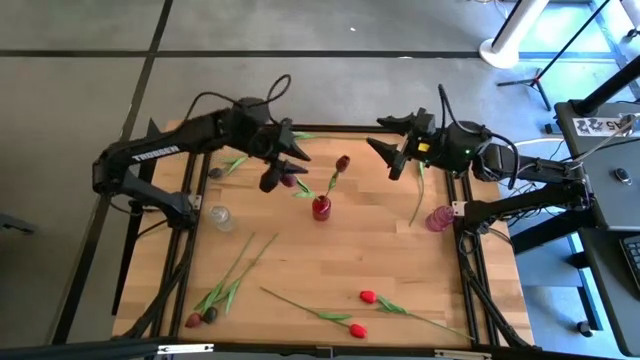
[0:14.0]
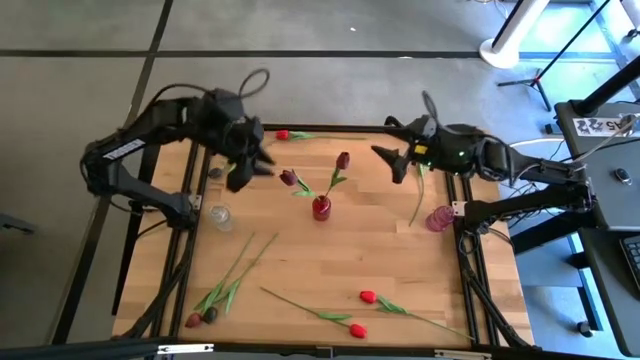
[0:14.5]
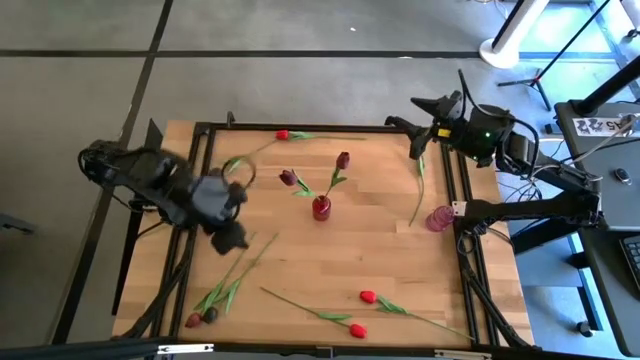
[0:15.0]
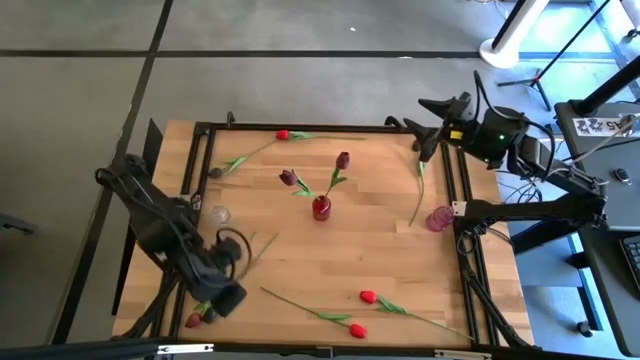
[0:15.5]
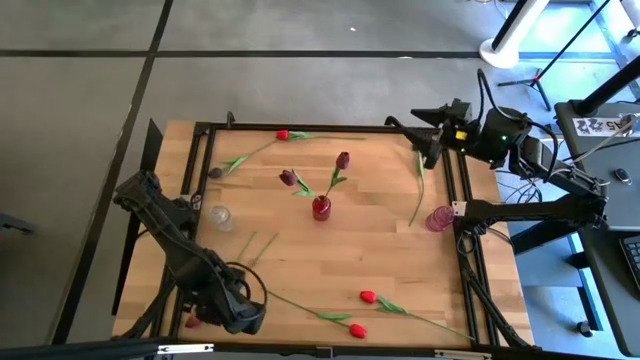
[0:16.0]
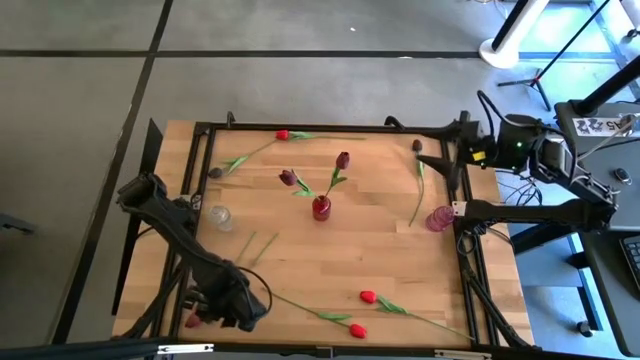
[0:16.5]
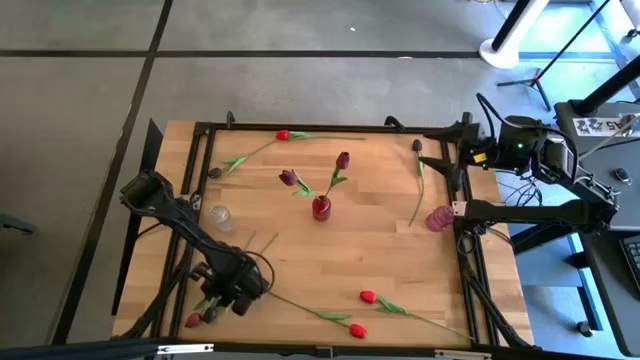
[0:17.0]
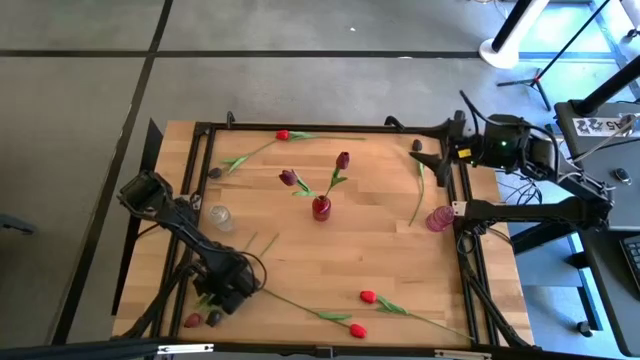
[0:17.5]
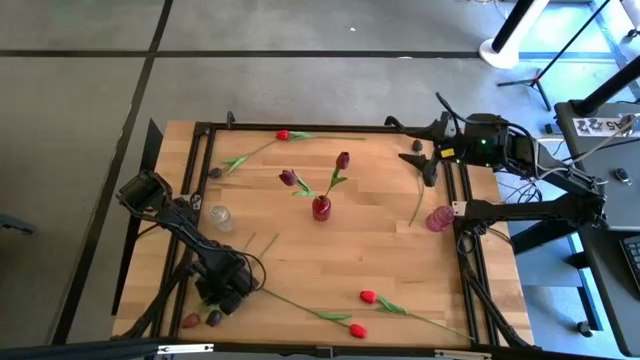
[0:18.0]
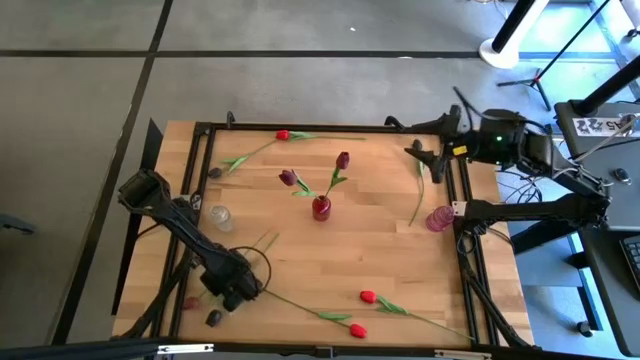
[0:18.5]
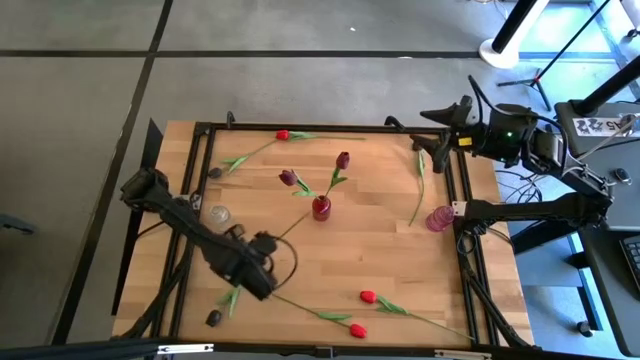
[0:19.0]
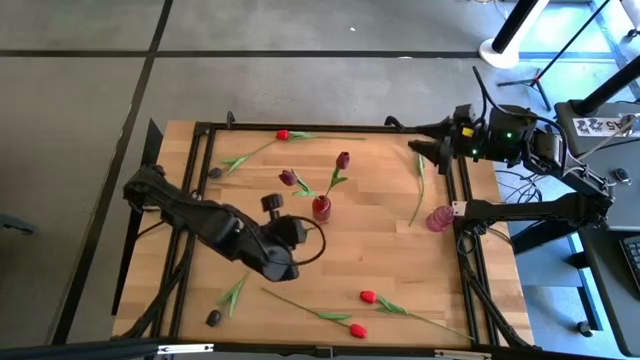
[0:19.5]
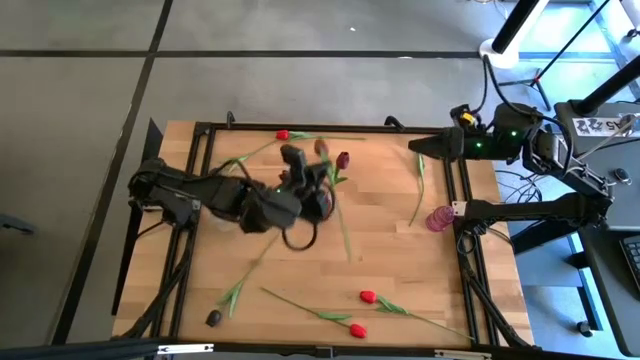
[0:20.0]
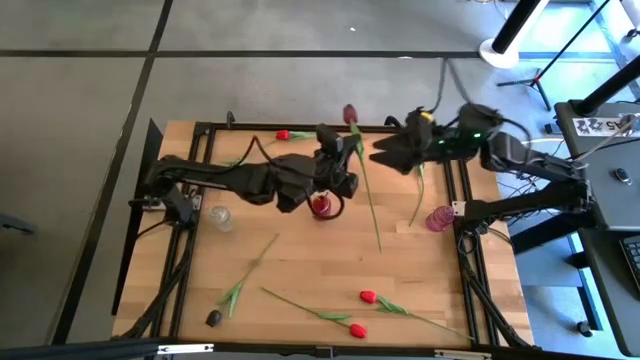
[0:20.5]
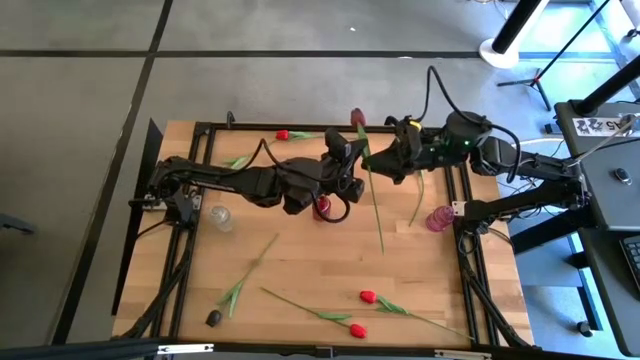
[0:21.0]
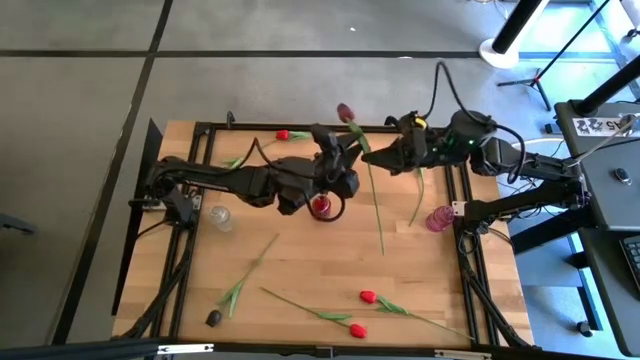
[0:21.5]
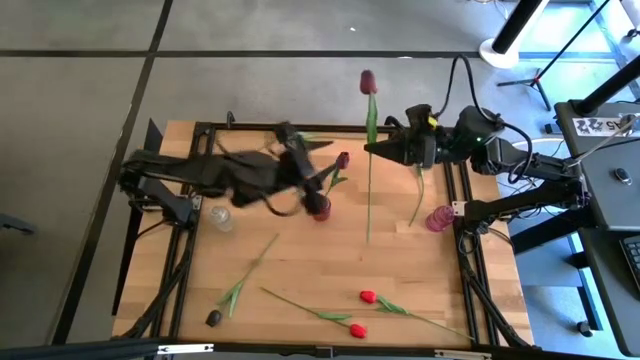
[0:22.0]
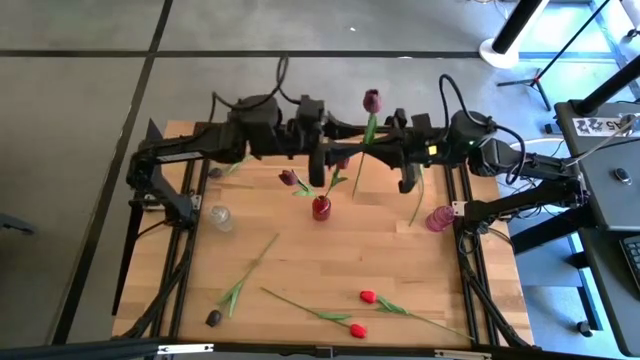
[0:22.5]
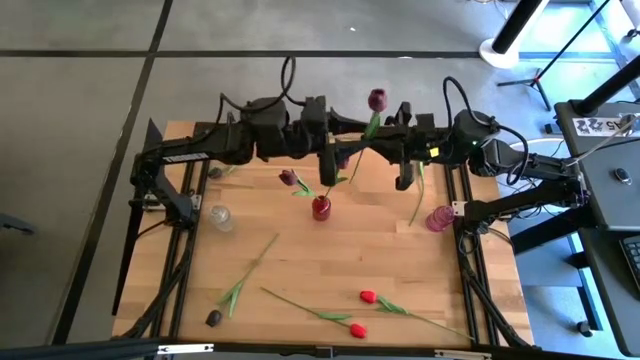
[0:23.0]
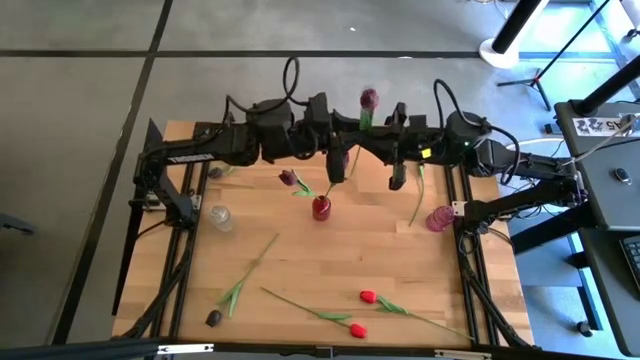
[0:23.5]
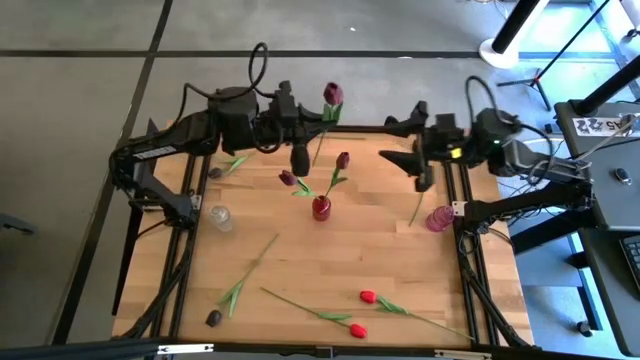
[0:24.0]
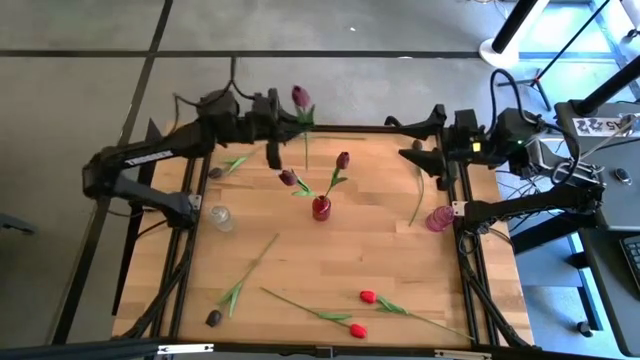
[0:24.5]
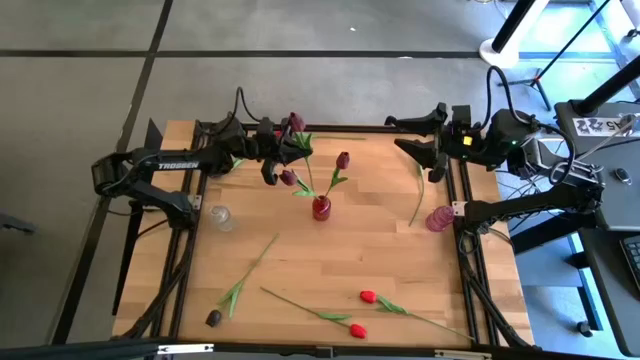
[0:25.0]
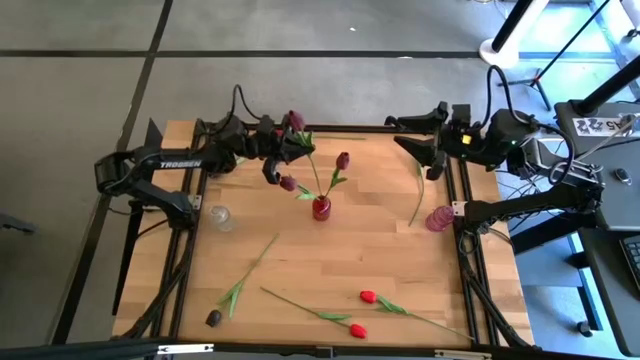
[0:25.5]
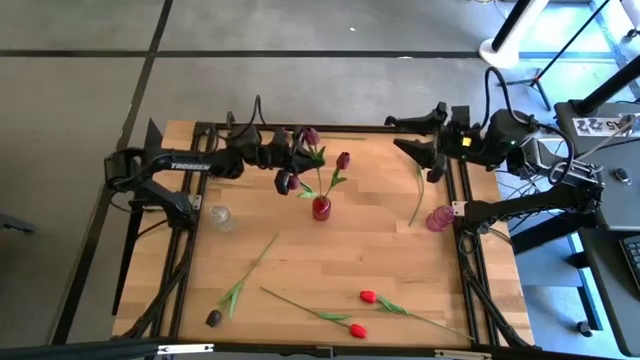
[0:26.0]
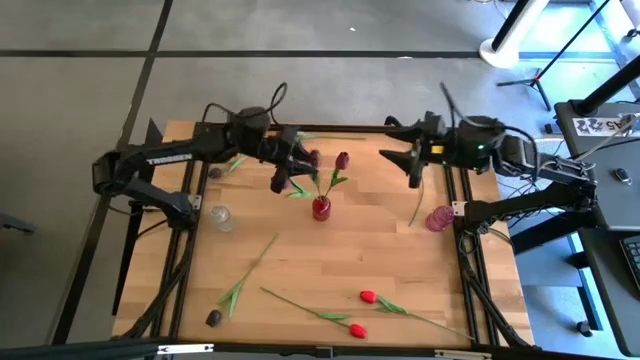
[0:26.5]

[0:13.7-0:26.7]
Task: Sort flowers into vase by color
Put the dark red tulip into the red vase

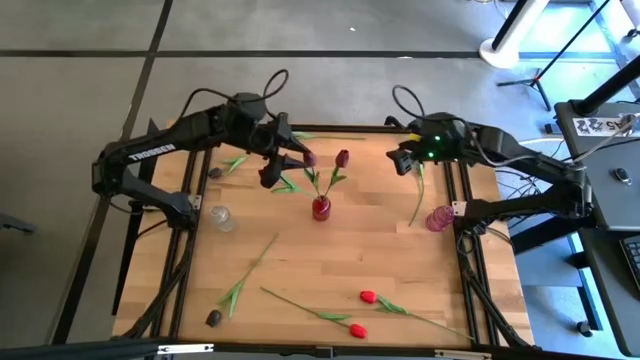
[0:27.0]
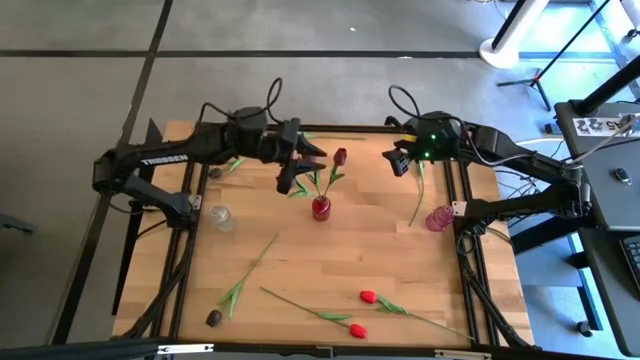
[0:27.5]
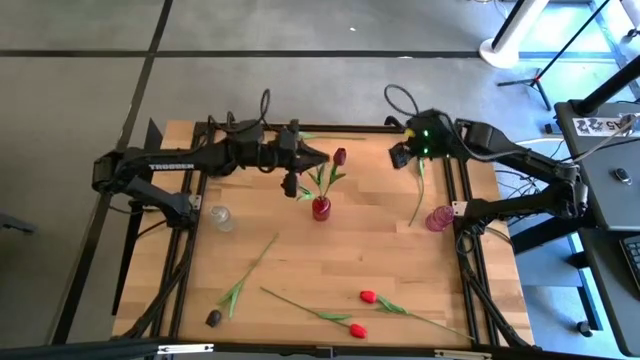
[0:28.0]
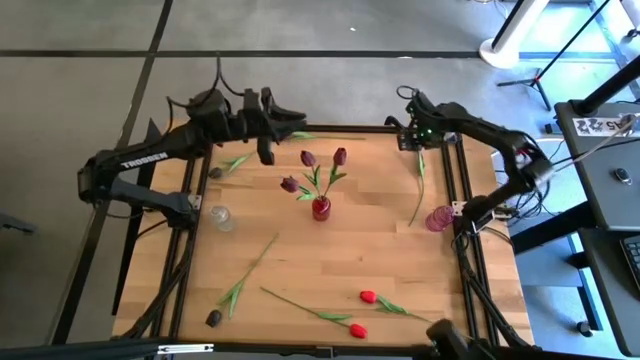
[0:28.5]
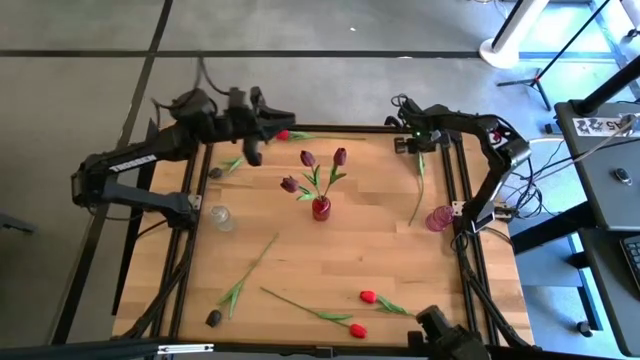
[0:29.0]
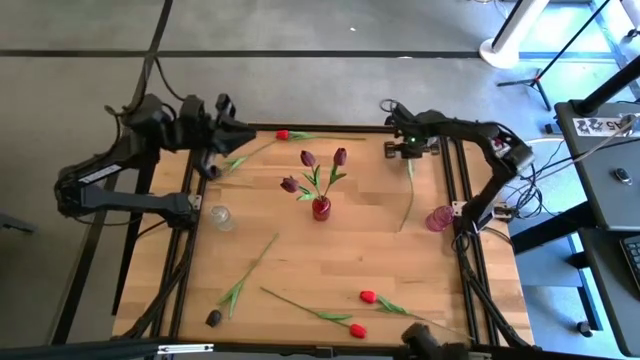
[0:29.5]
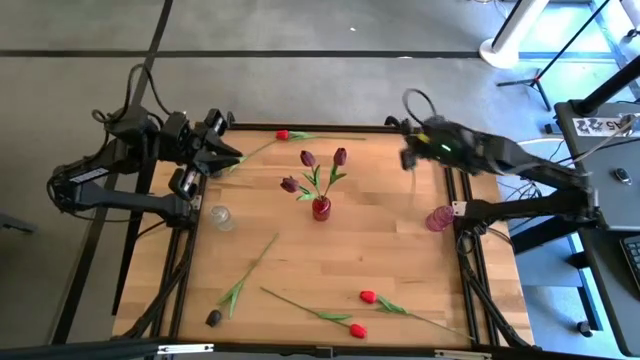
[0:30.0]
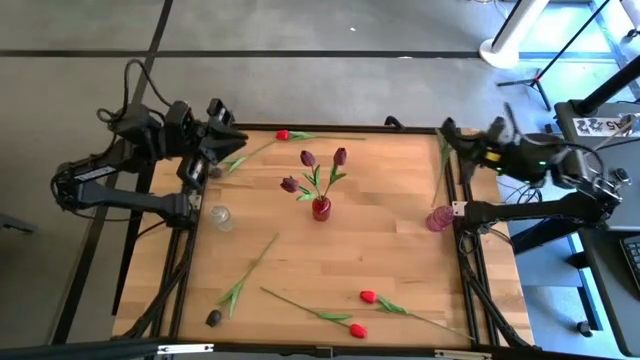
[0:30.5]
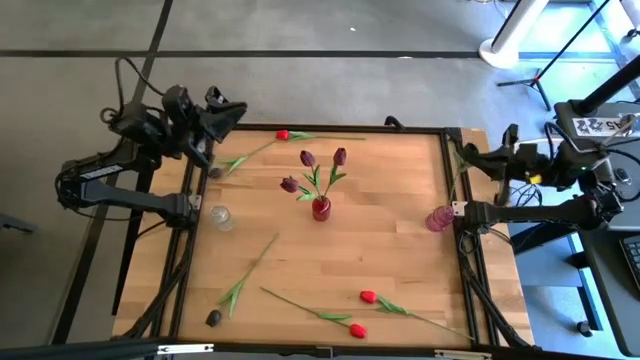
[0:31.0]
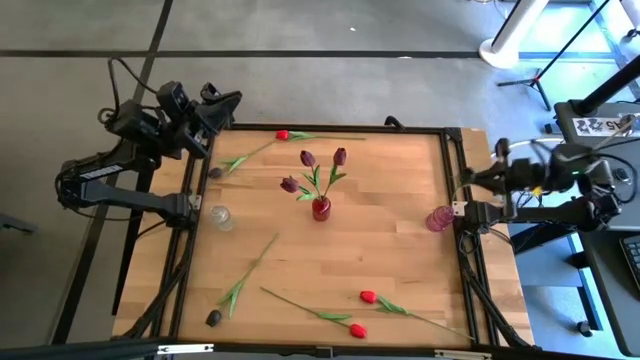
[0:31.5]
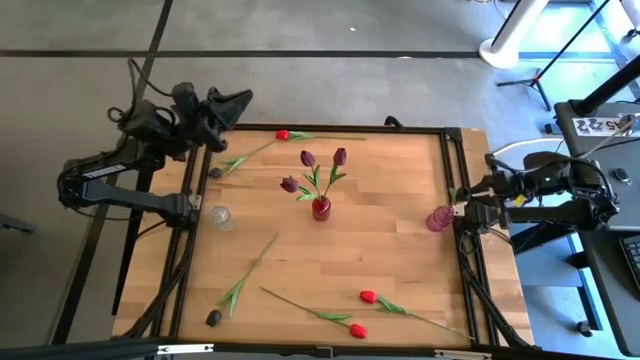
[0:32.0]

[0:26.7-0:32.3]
Put the top right black tulip into the pink vase

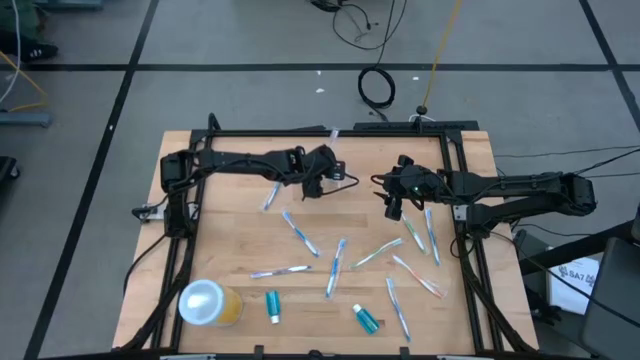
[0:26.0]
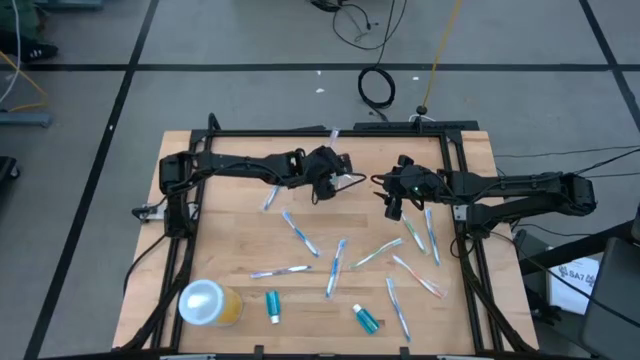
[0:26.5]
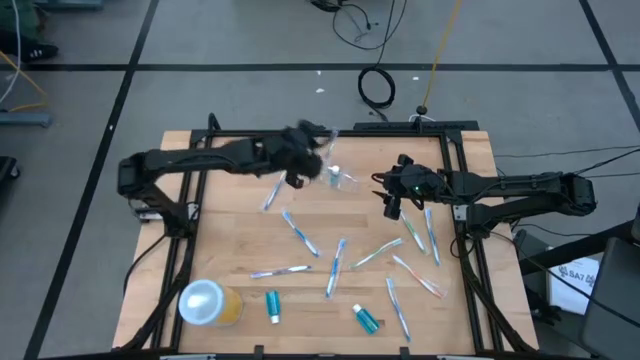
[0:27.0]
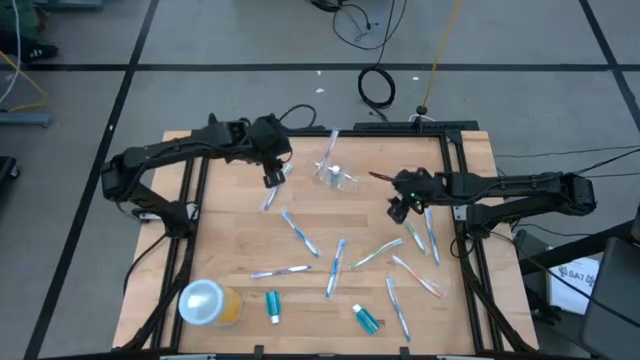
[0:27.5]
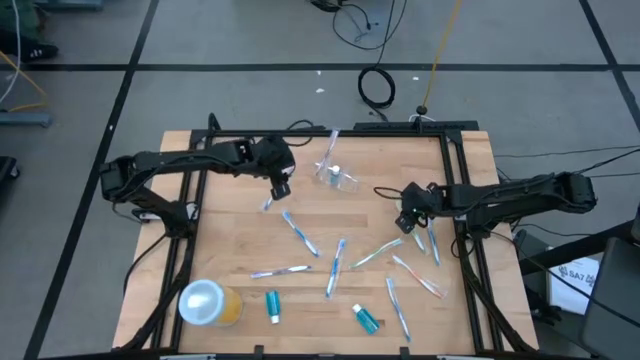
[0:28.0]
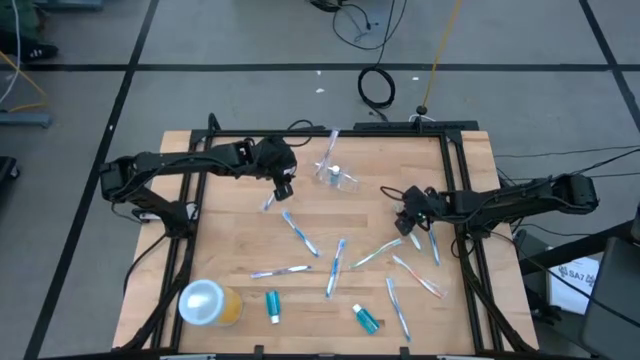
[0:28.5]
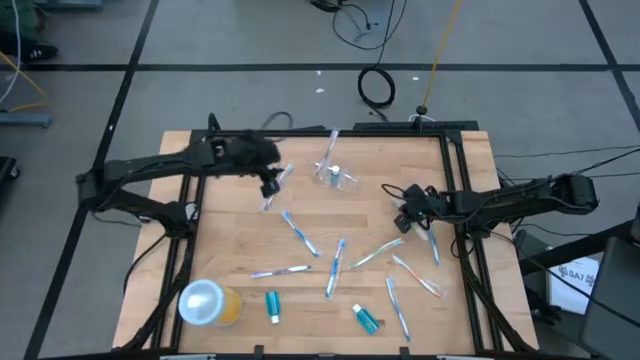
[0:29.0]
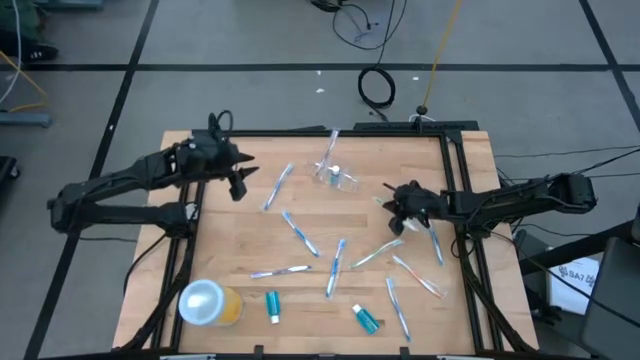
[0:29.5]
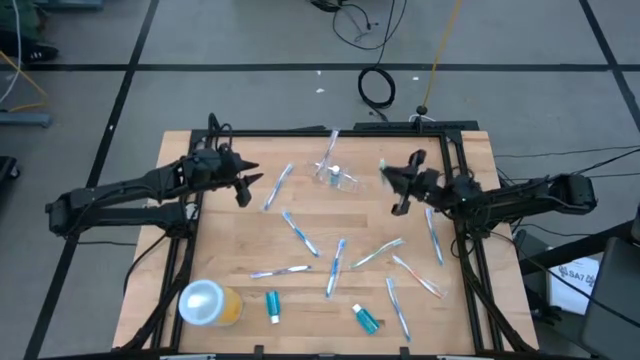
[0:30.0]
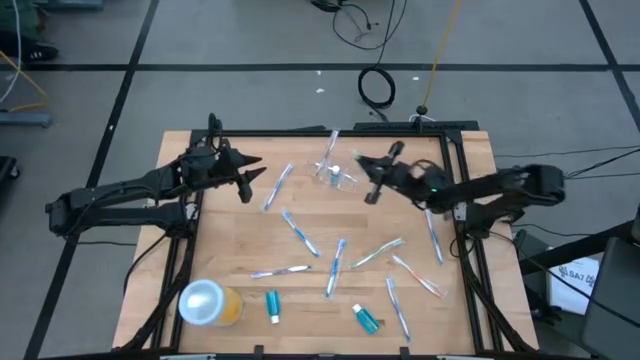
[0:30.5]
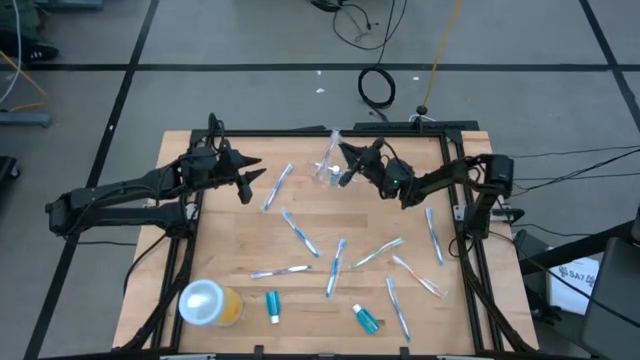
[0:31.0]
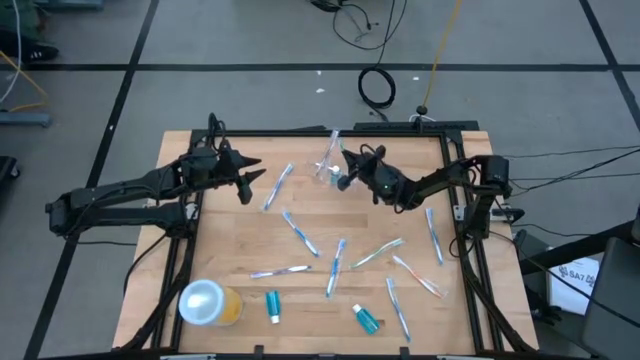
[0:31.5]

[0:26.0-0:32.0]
Task: Pick & Place toothbrushing station
Put the top green toothbrush into the transparent organizer
